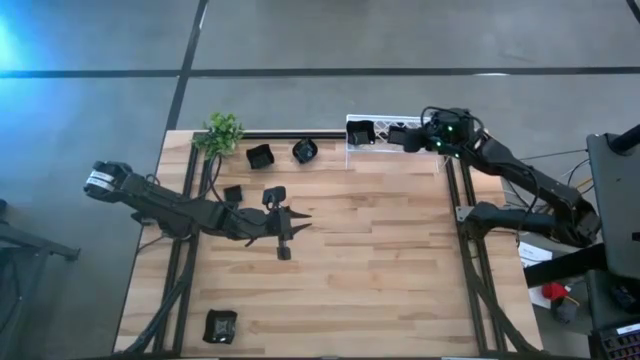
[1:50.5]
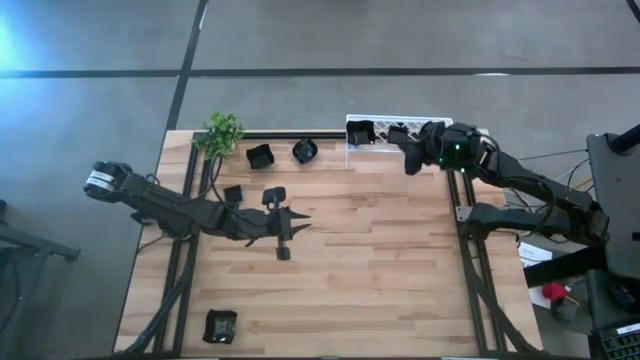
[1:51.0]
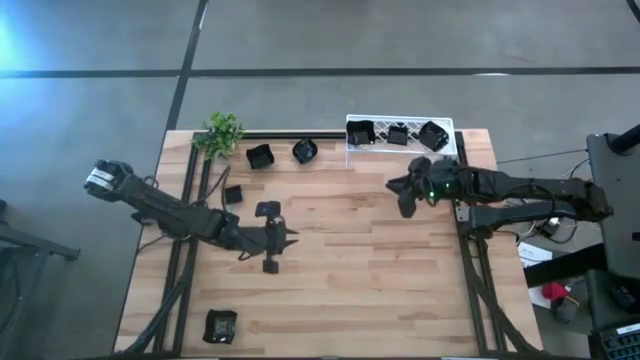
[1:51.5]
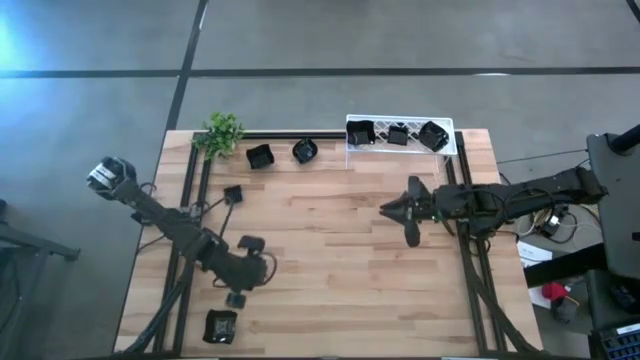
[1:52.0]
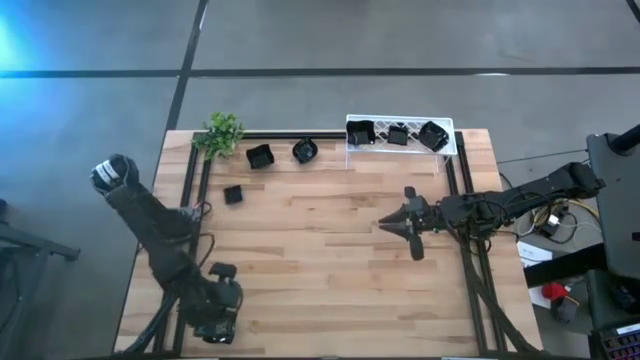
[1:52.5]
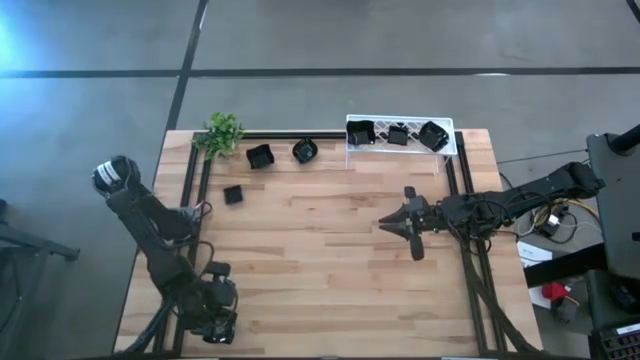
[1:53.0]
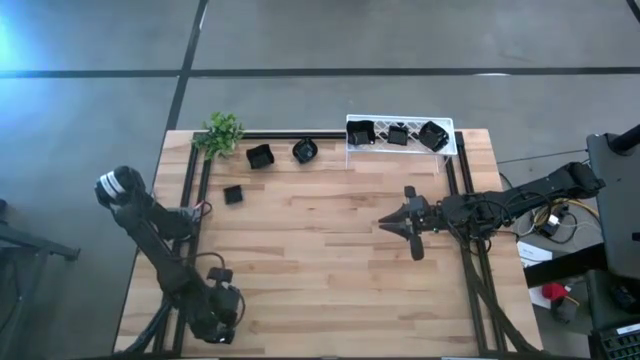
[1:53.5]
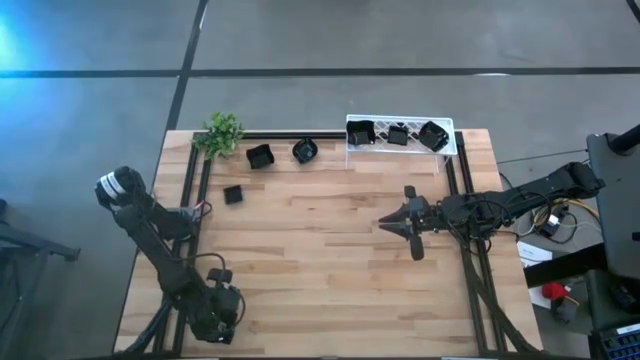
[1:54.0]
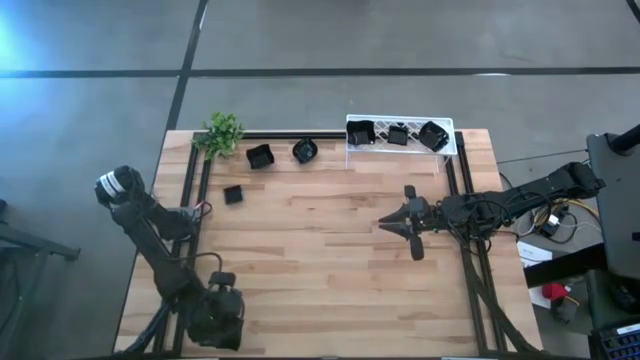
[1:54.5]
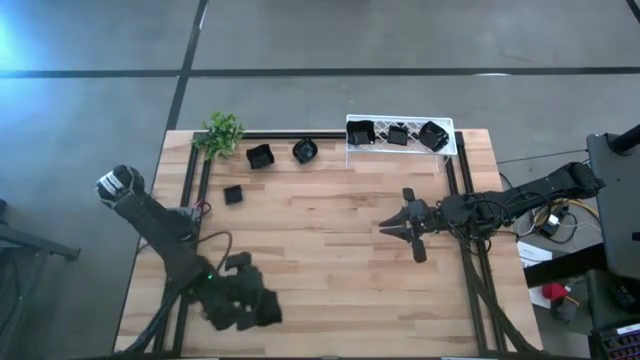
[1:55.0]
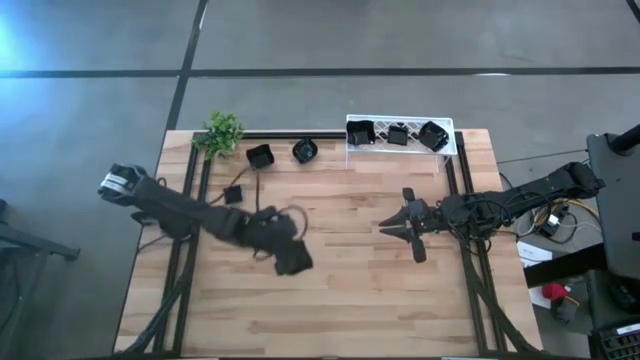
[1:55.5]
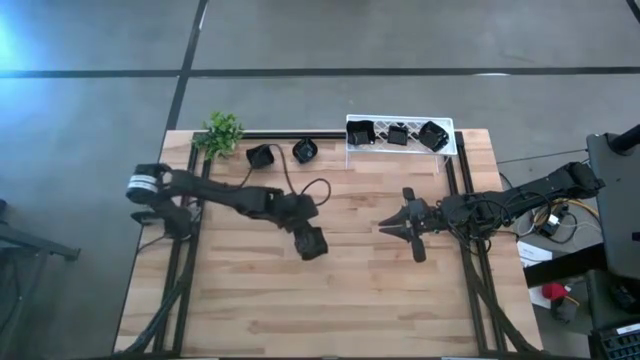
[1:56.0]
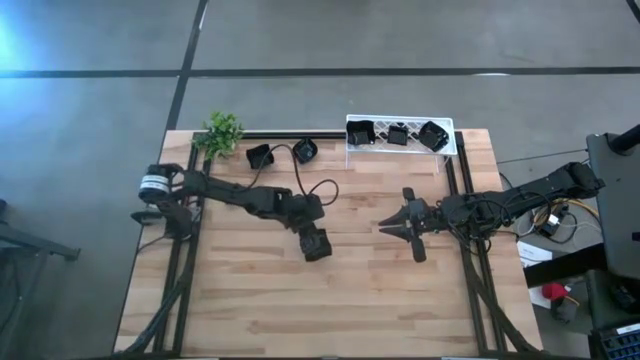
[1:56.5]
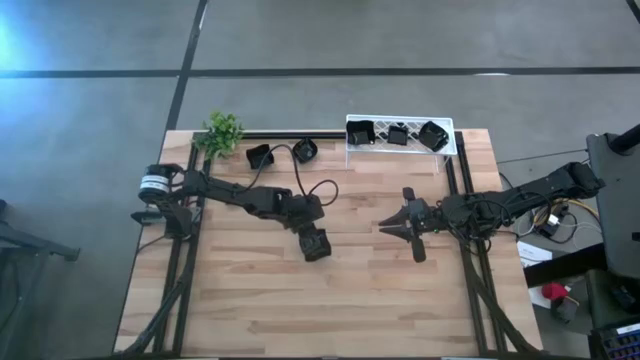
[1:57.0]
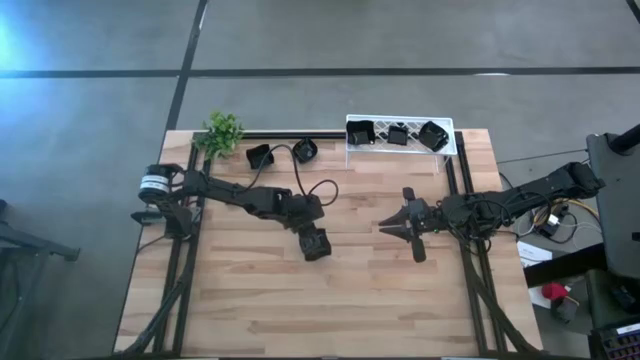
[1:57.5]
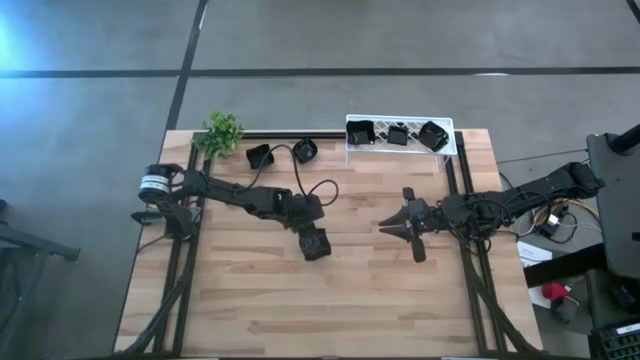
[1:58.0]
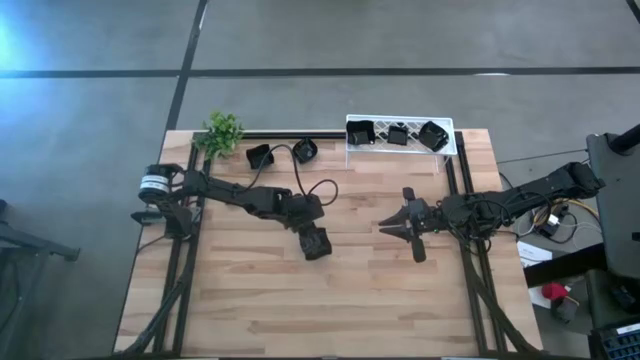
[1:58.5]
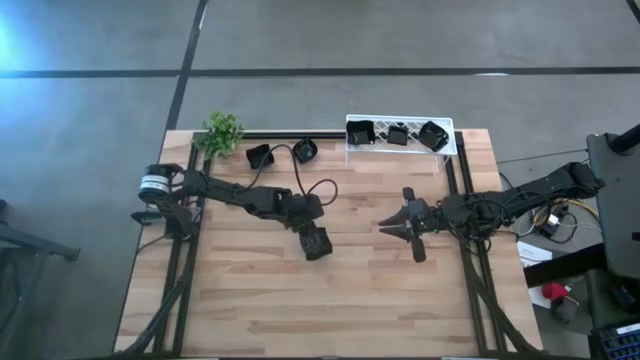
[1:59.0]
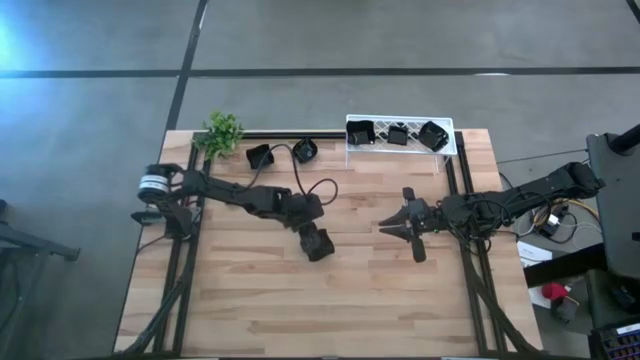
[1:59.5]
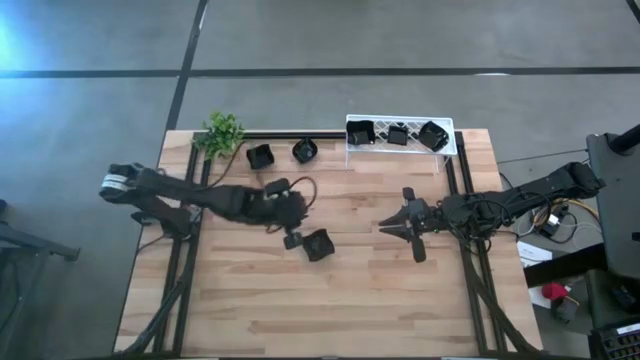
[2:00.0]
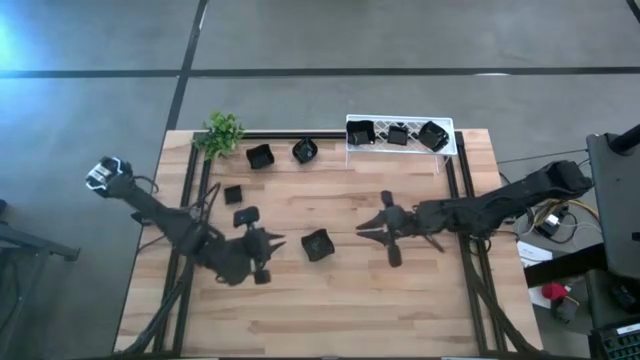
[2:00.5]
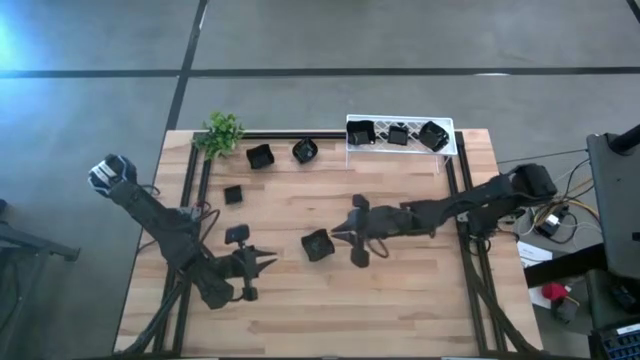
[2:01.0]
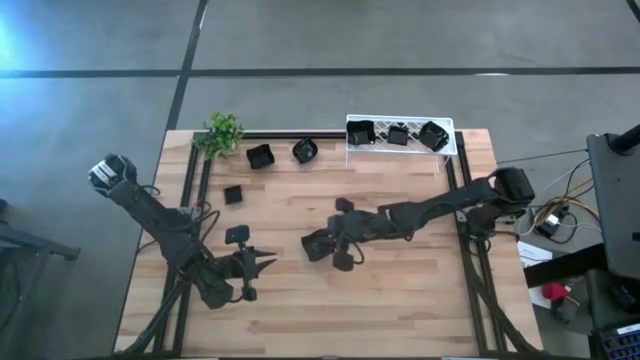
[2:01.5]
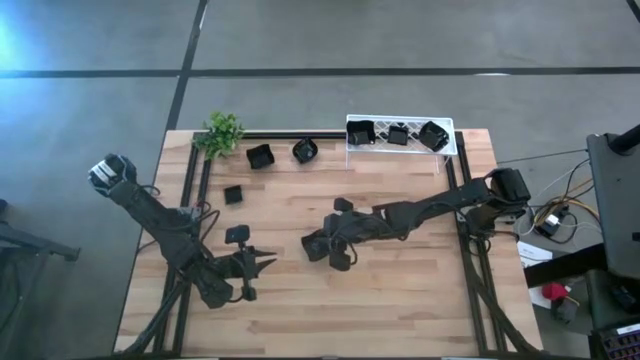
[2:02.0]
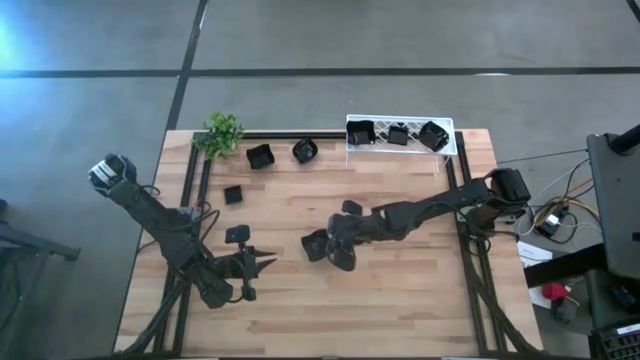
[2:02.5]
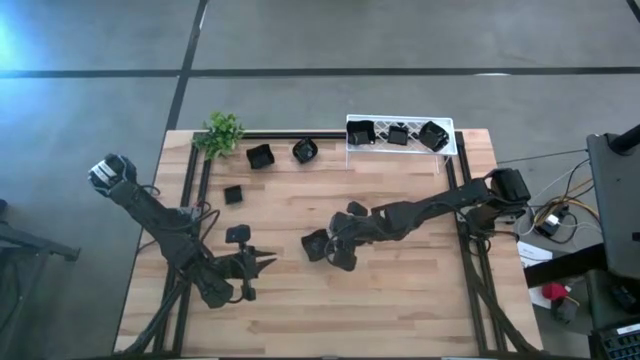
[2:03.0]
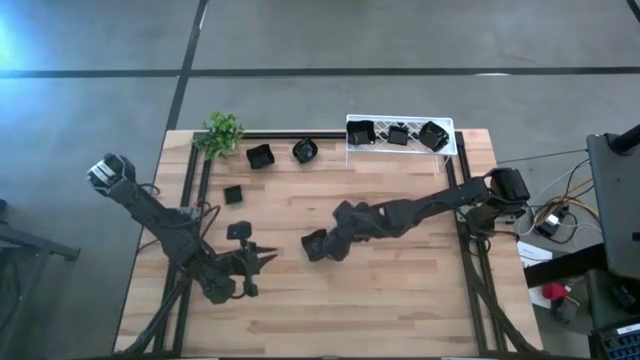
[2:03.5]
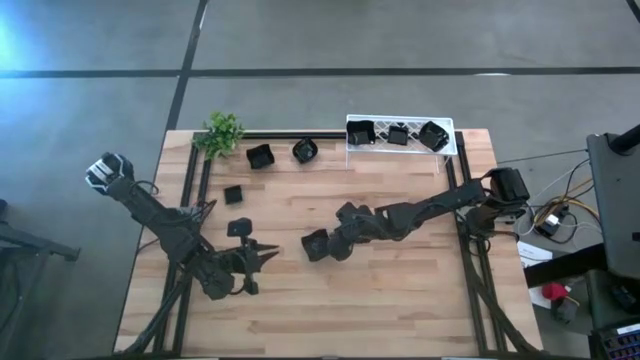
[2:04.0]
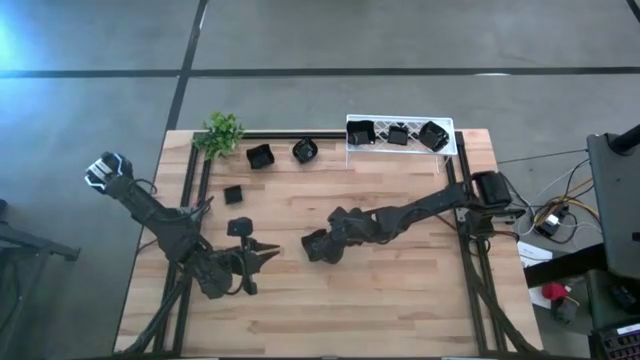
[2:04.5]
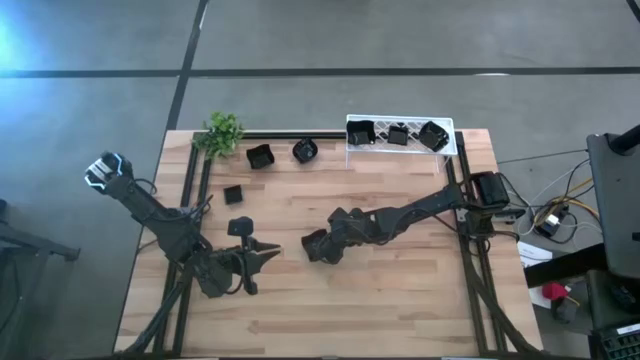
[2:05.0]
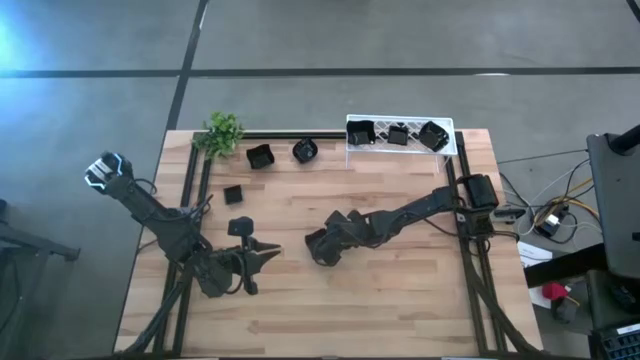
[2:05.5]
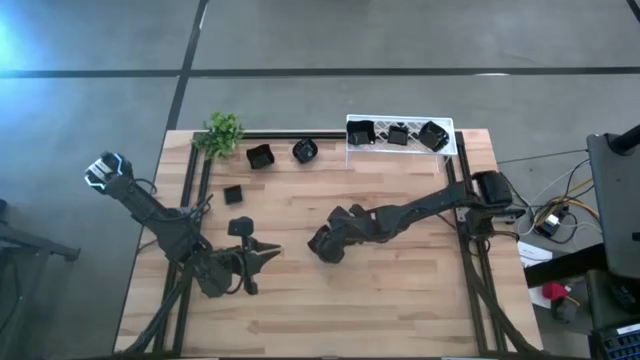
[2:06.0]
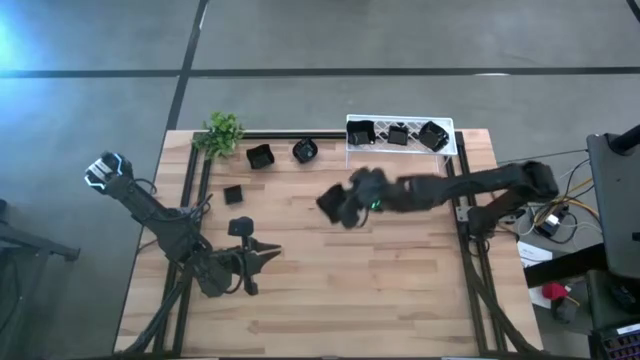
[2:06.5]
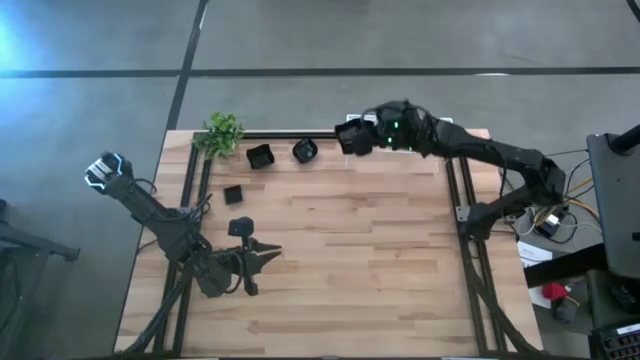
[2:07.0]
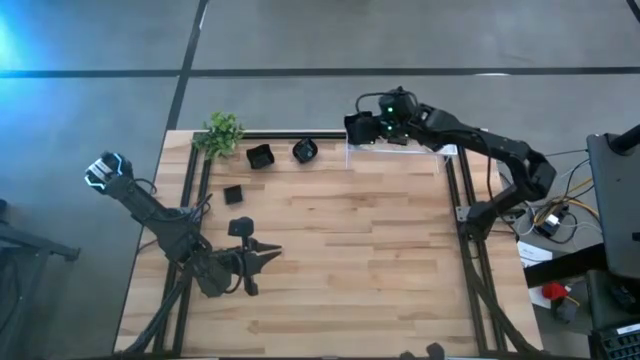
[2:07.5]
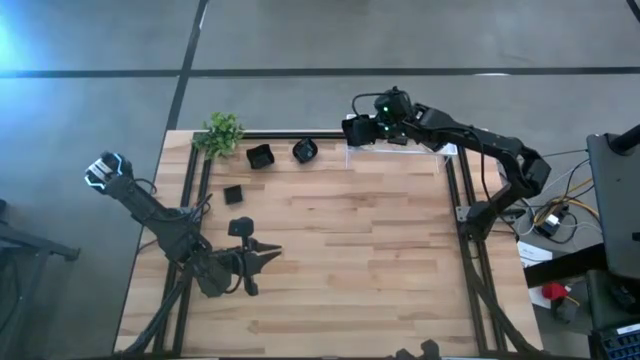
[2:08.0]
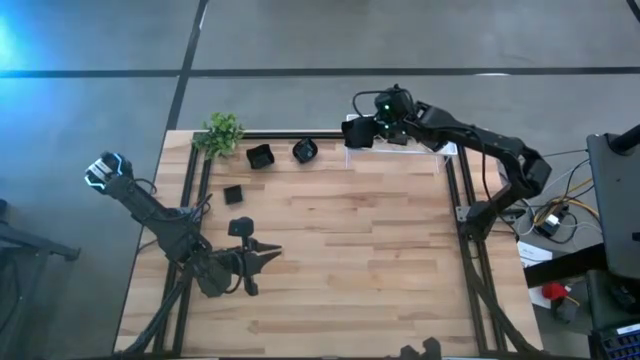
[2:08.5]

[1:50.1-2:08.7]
Task: Pick & Place Mini shaped plates
Stack the black distorted square plate on top of the black distorted square plate on the shelf

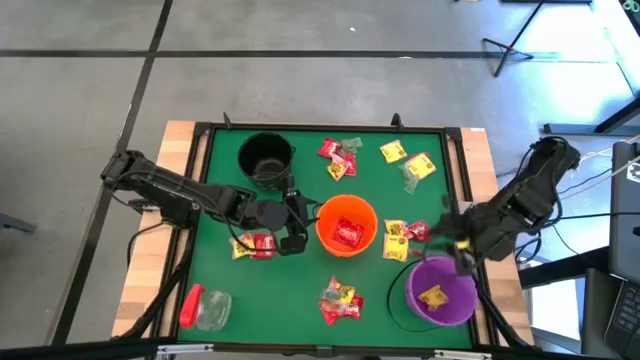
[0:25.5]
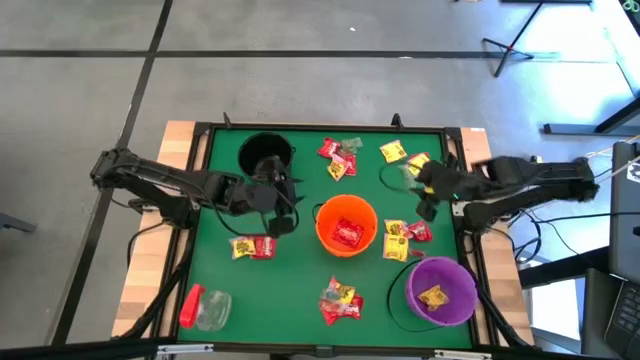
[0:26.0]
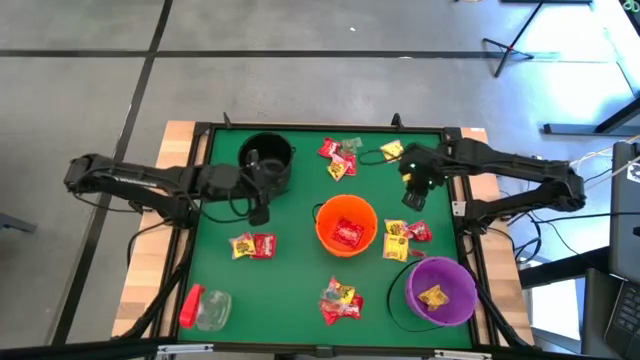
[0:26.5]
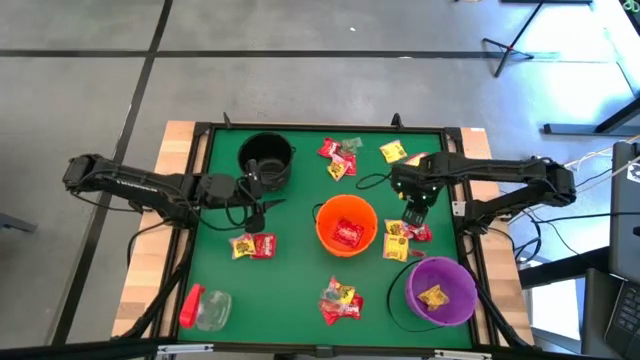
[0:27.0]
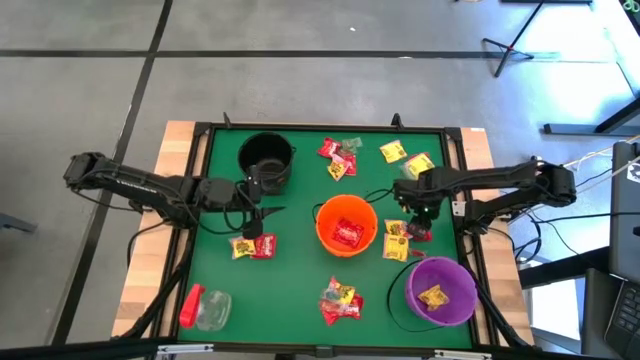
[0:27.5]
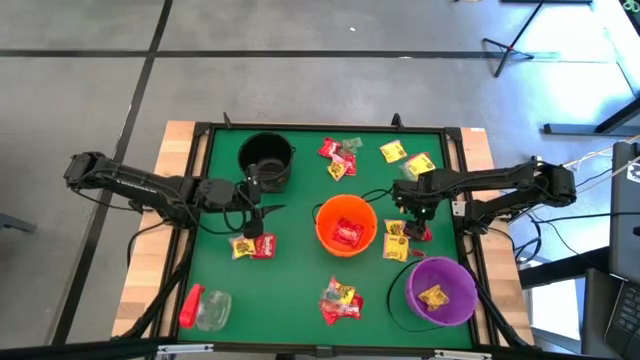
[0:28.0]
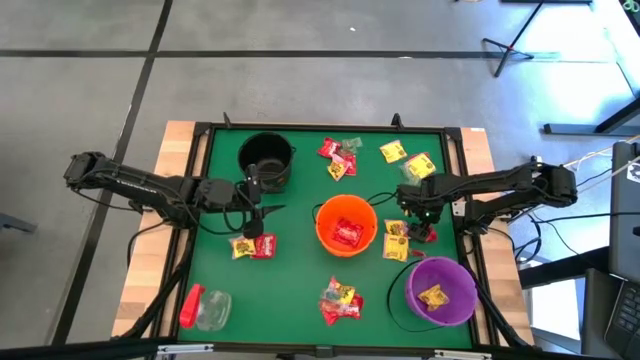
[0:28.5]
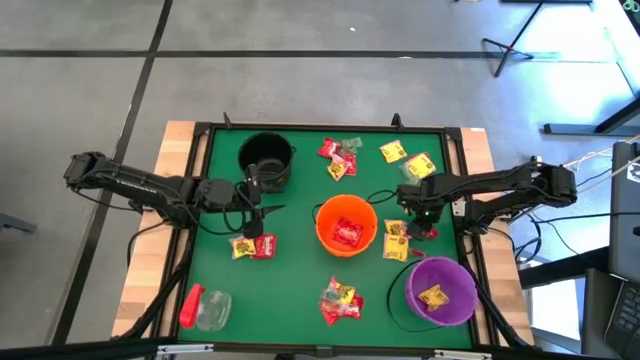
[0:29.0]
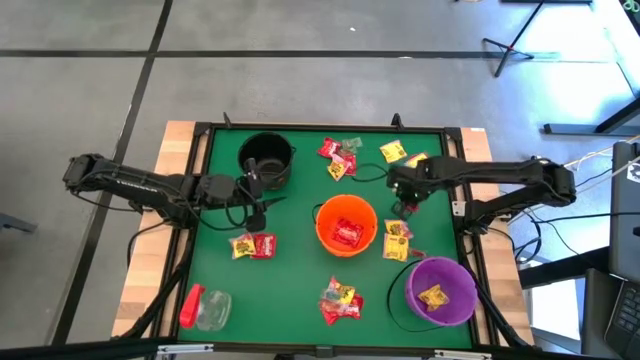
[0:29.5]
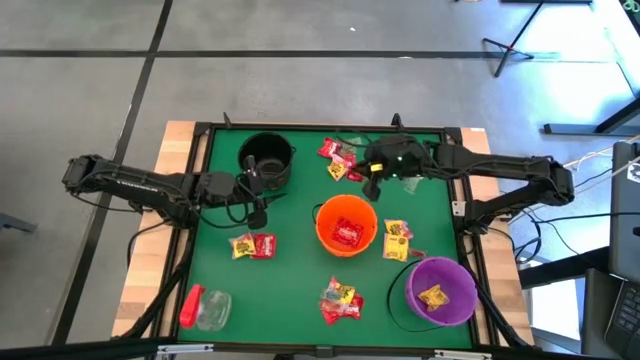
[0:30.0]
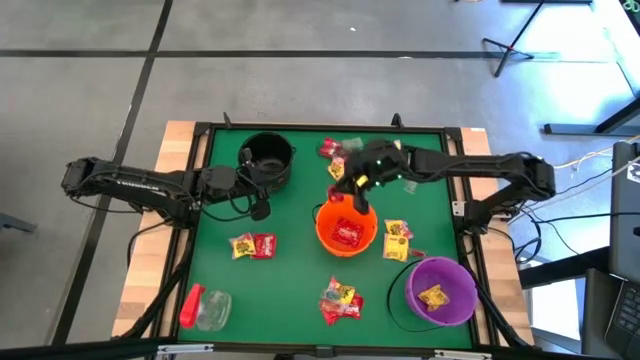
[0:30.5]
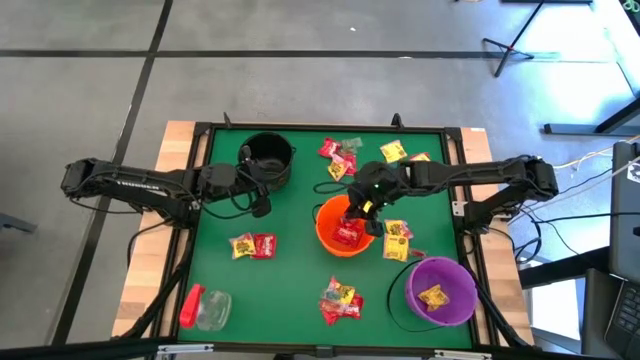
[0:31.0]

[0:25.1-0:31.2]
Task: Sort candy
Put the red candy into the orange bin
